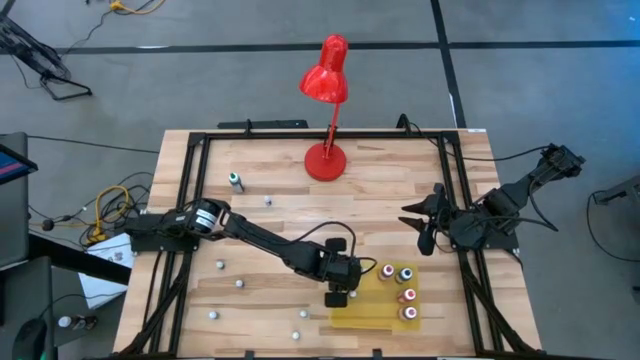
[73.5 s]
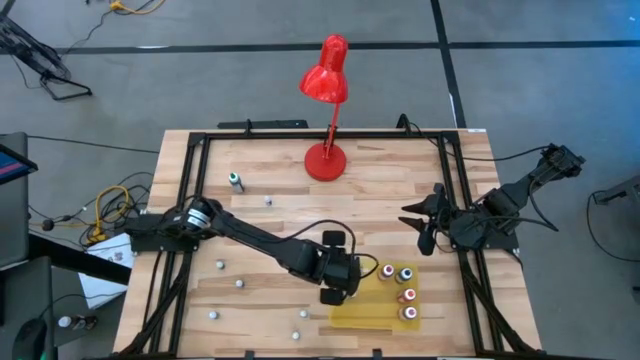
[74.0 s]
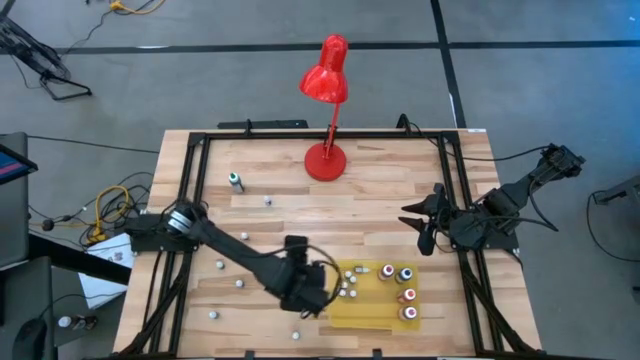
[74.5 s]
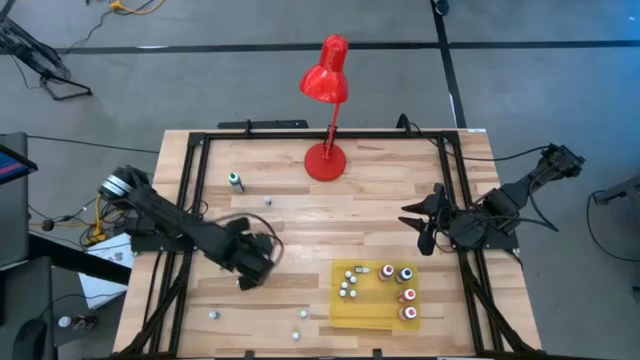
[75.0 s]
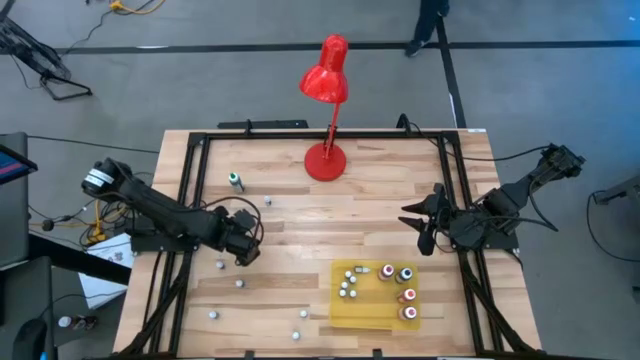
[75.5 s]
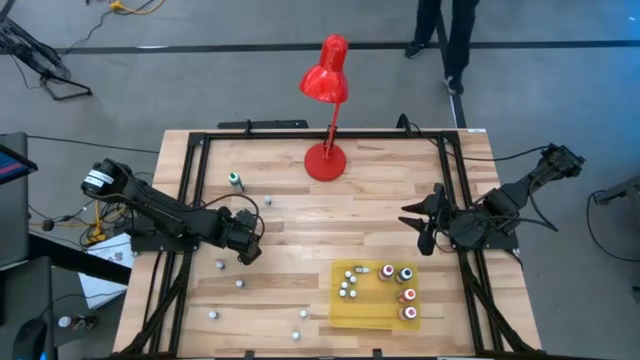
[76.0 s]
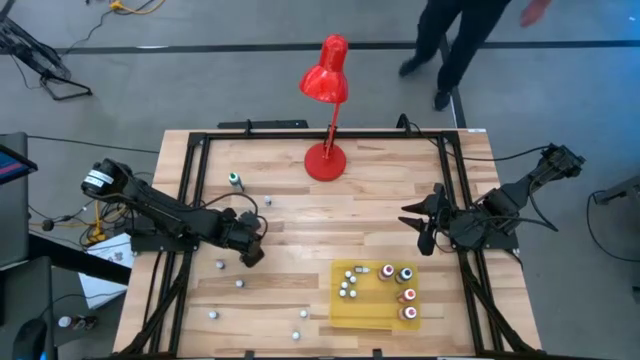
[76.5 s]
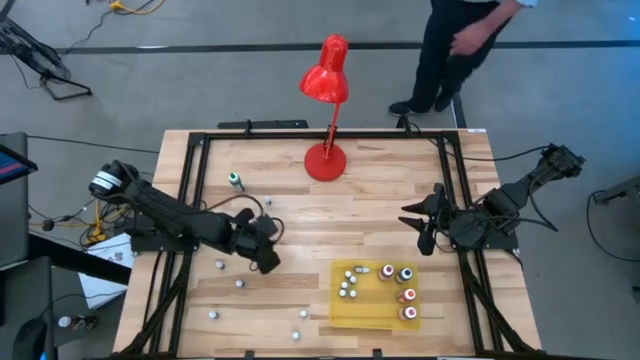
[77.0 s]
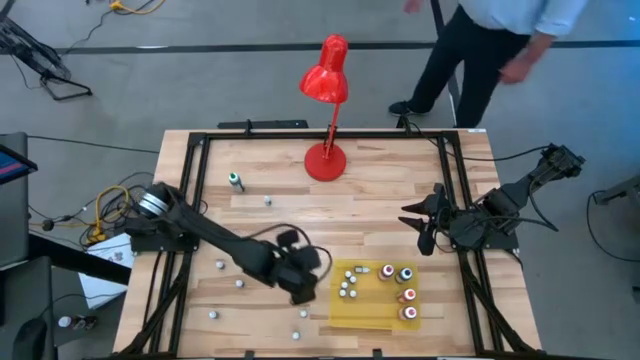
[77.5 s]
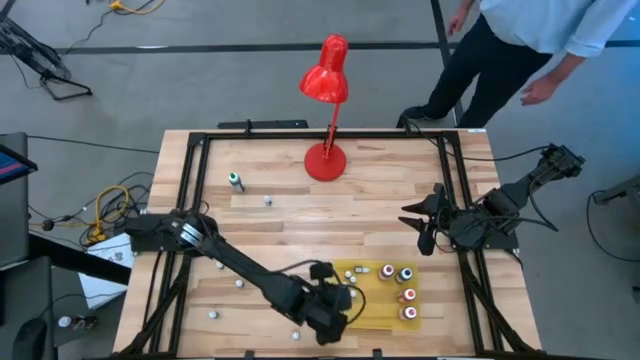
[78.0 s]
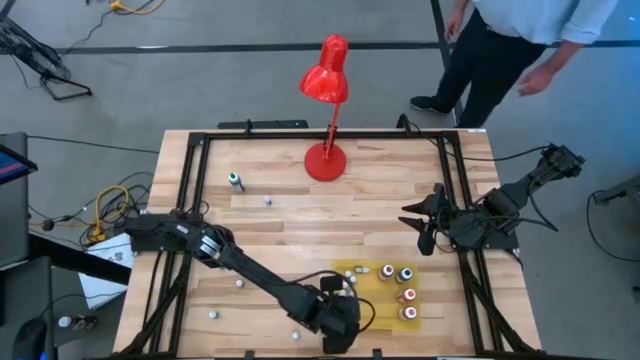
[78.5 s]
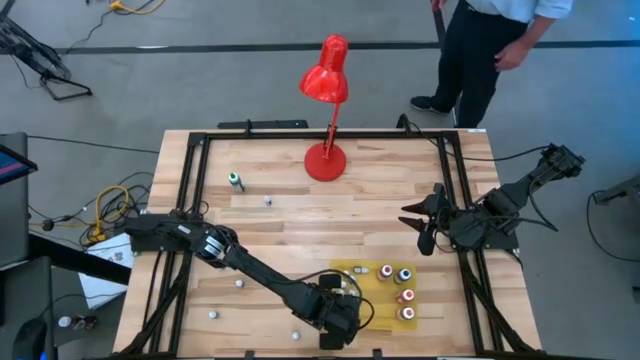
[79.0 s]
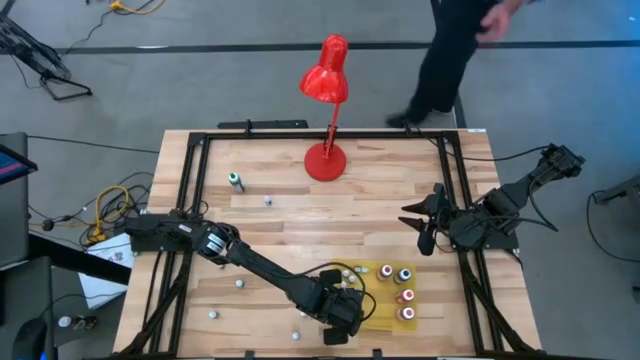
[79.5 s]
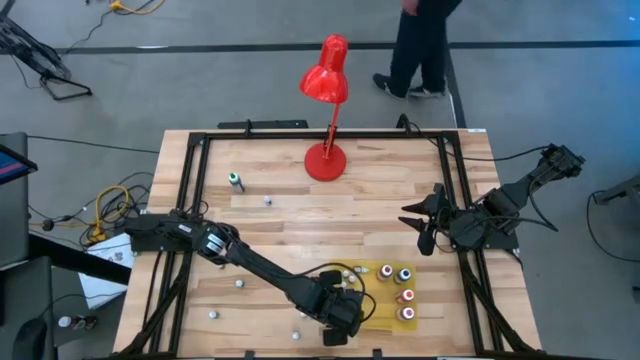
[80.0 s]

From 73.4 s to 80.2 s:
Task: Pick & Place food coloring
Put the orange food coloring into the yellow bin

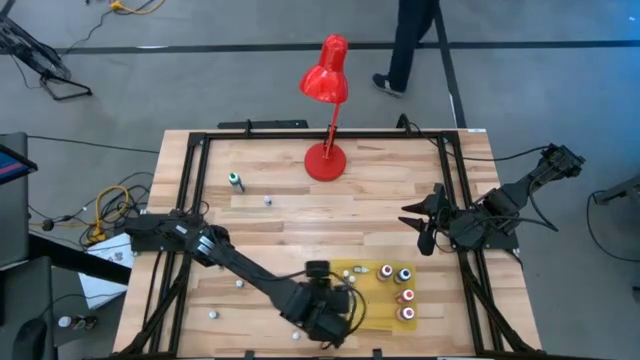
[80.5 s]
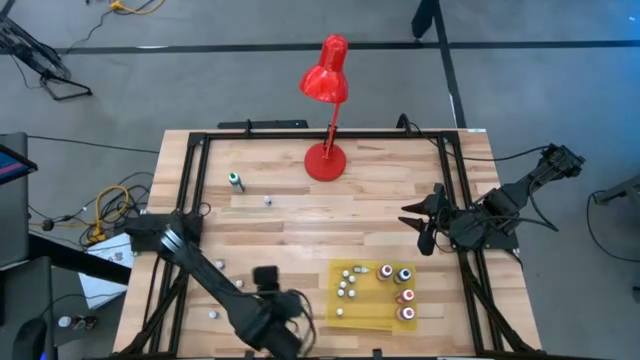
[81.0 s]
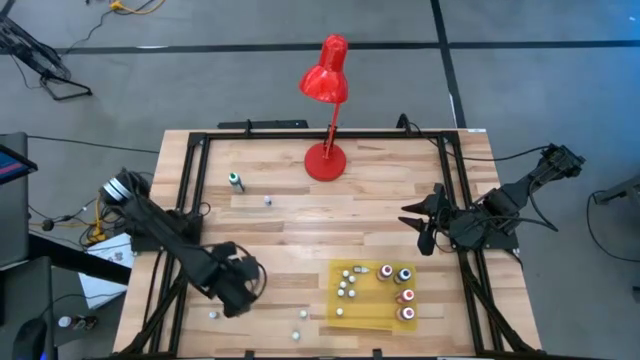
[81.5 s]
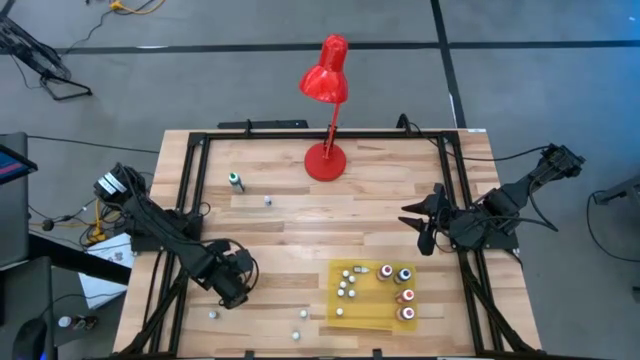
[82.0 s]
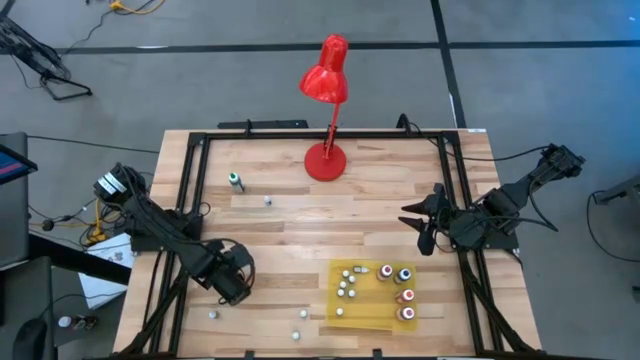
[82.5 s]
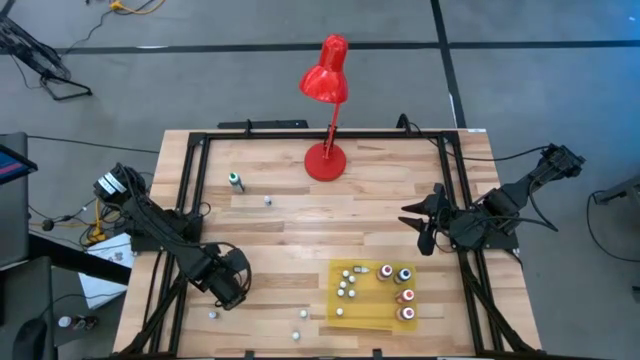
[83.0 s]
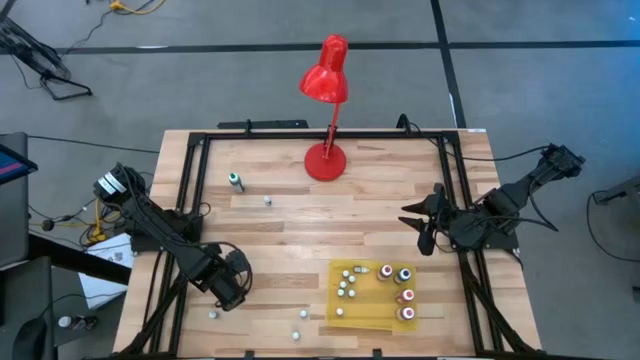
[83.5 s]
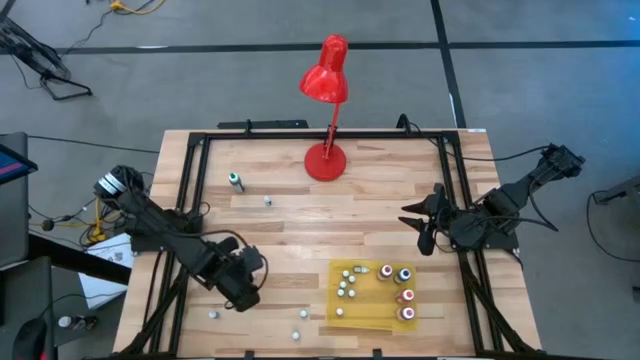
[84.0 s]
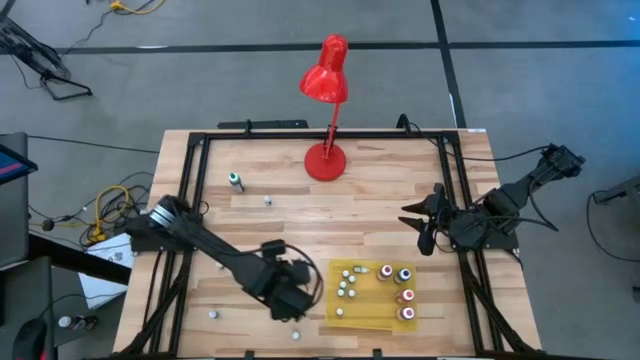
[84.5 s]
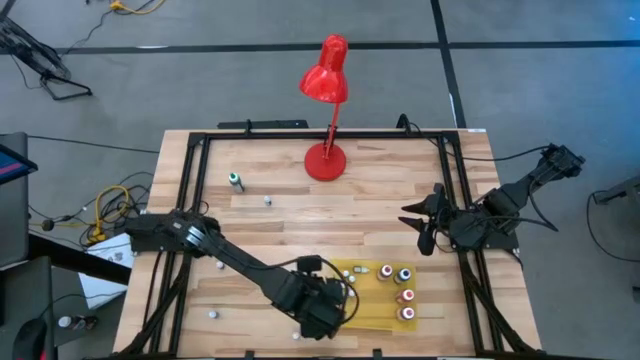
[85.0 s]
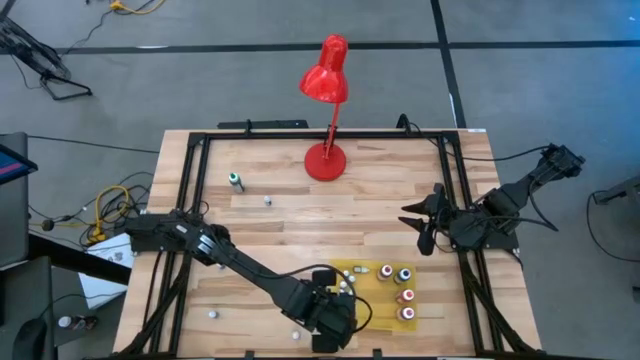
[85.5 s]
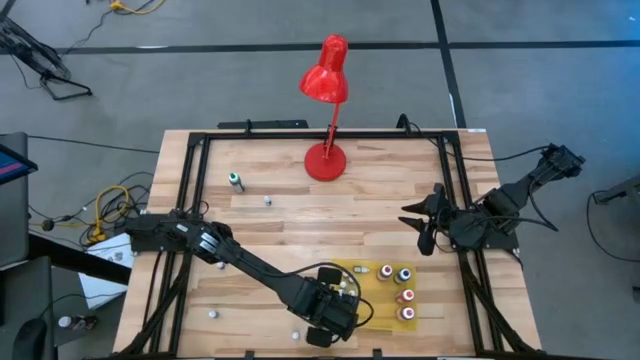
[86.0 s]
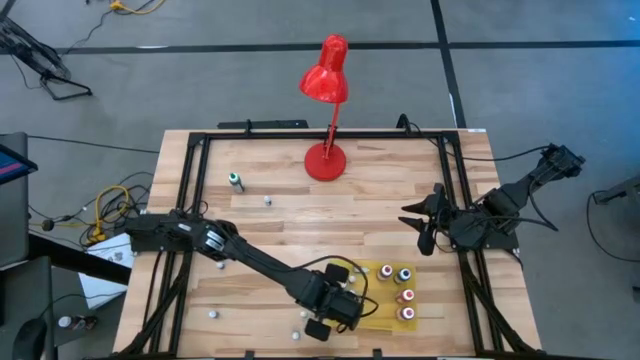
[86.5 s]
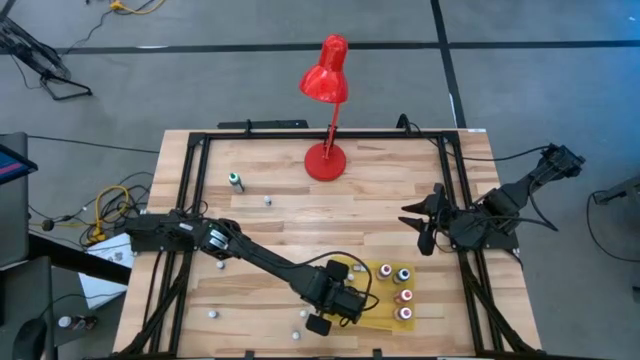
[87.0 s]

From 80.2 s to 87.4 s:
Put the violet food coloring into the yellow bin

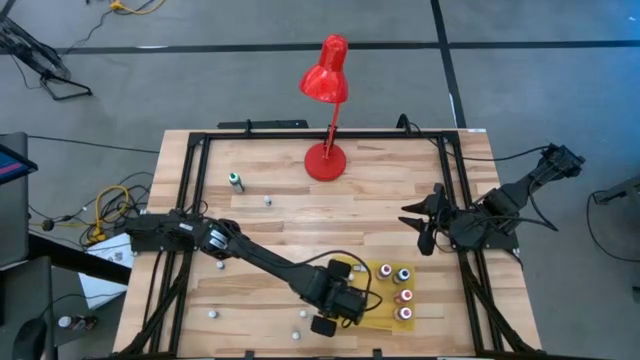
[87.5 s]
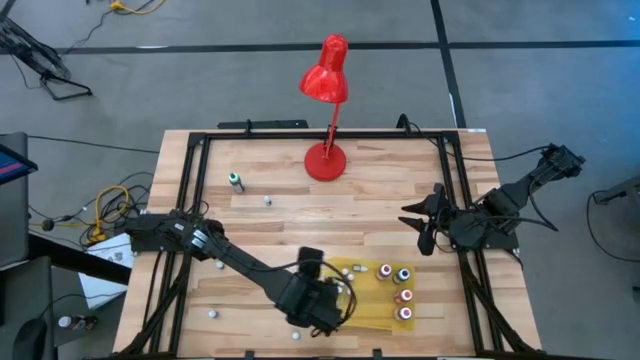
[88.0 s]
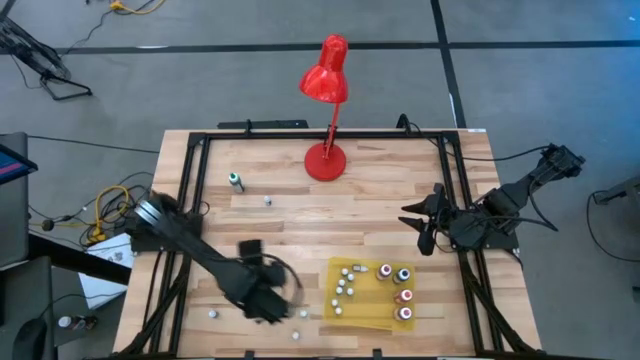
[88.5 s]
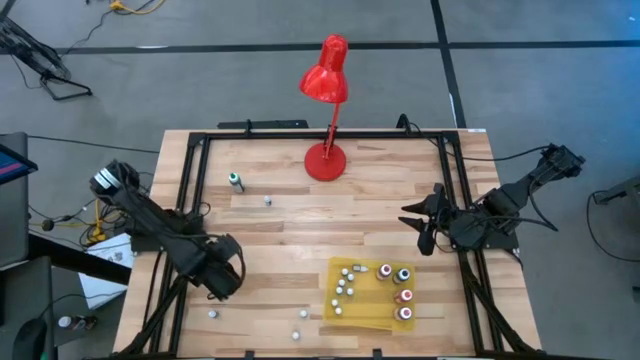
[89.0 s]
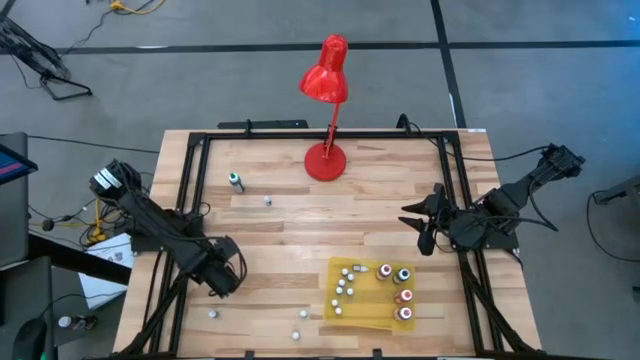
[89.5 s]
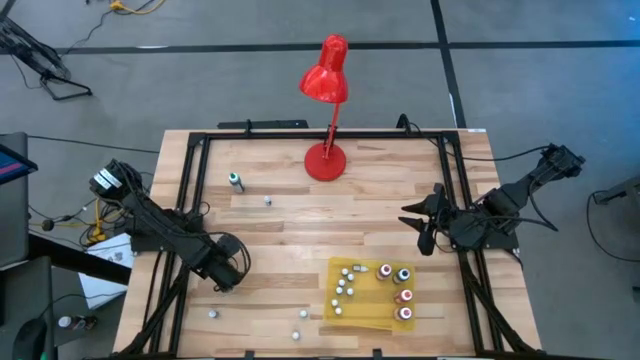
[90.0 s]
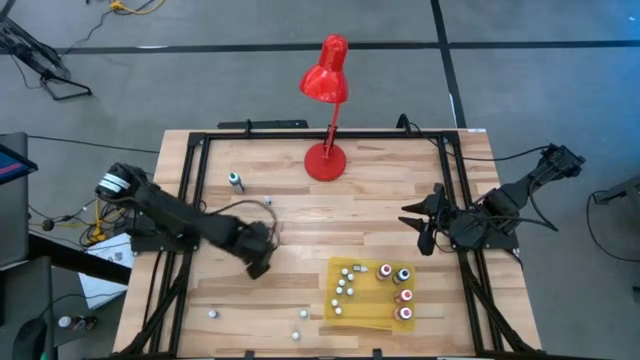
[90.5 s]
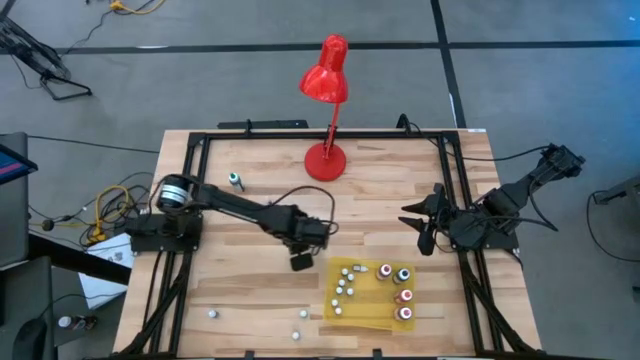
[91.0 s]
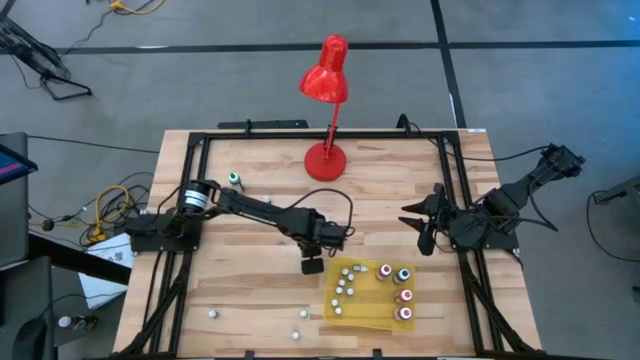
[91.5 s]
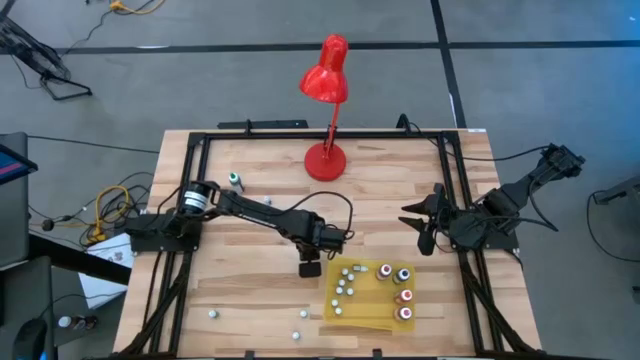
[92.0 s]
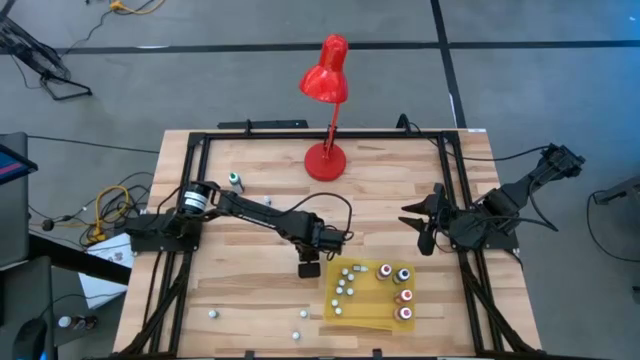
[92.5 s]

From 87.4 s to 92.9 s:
Move the blue food coloring to the center of the table

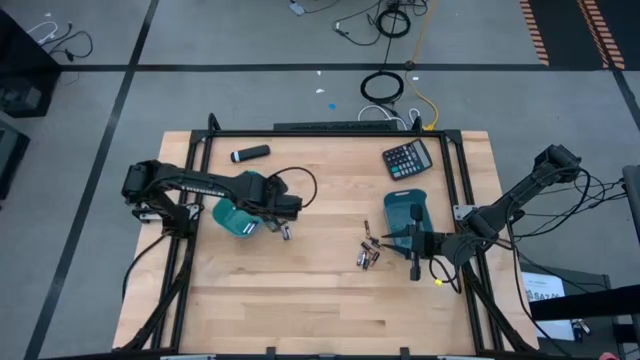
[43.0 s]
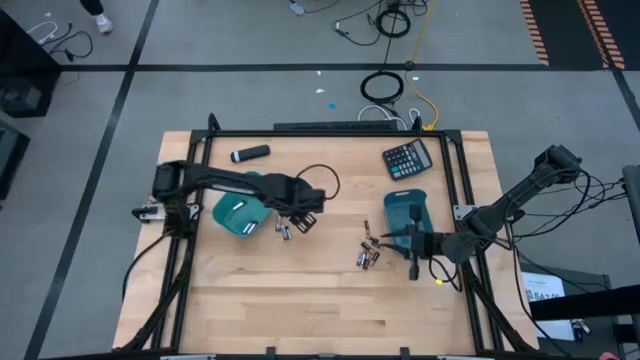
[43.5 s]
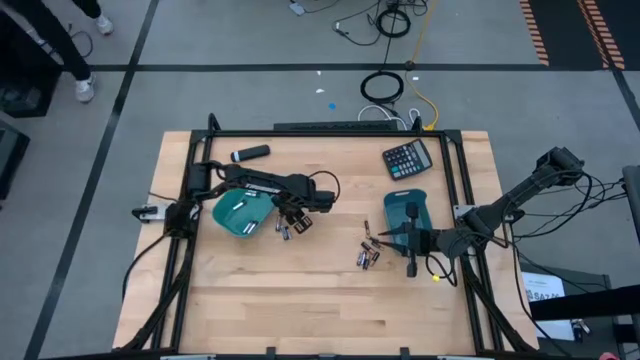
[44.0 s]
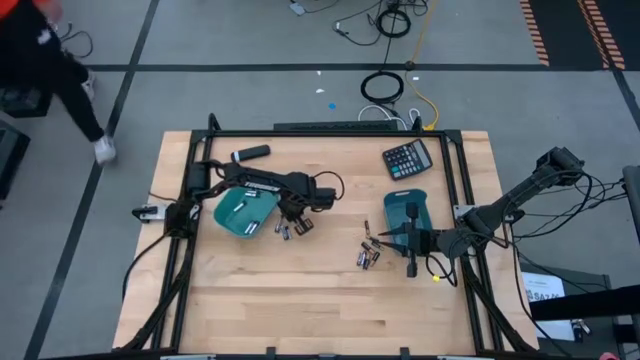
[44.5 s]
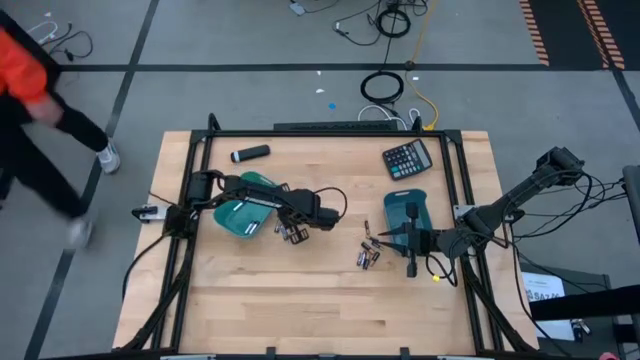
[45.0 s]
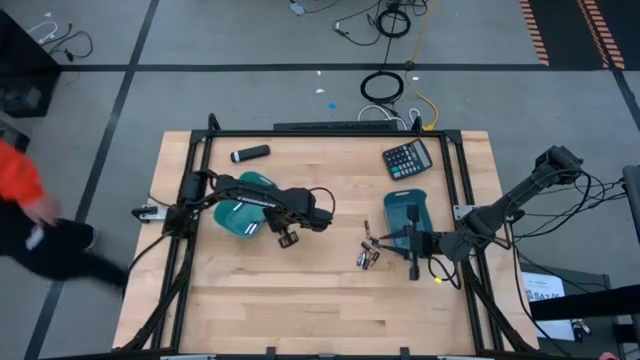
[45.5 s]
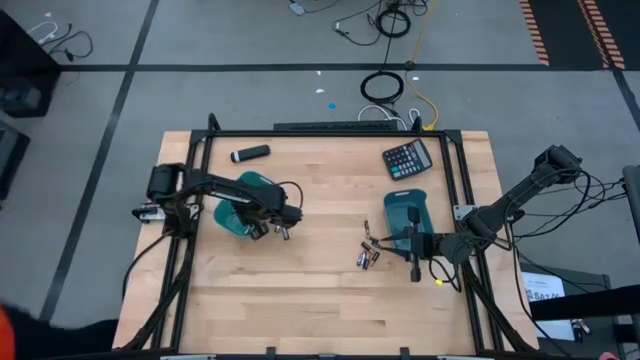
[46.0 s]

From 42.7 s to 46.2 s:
Task: Sort batteries
Put the silver battery into the green bin
